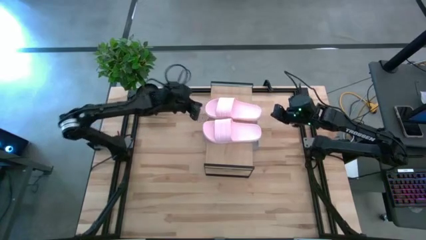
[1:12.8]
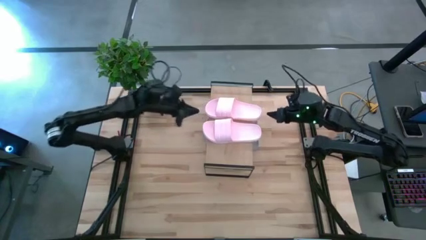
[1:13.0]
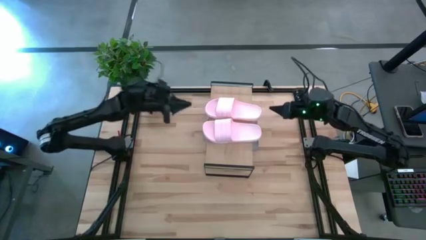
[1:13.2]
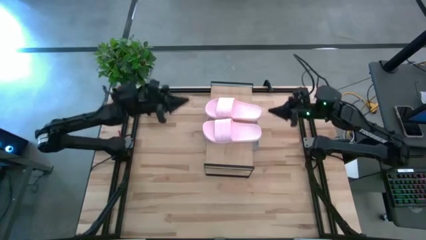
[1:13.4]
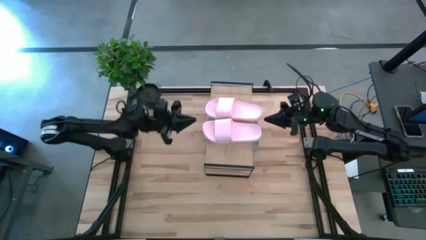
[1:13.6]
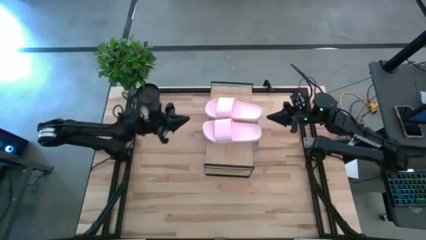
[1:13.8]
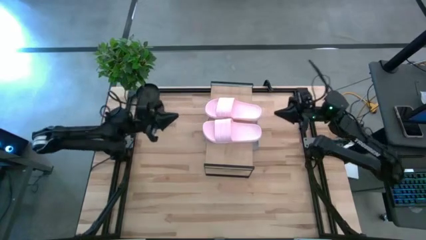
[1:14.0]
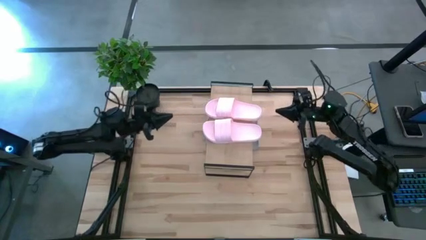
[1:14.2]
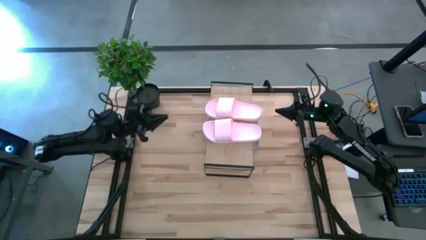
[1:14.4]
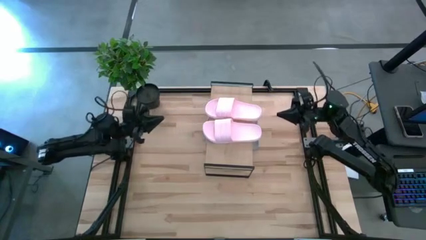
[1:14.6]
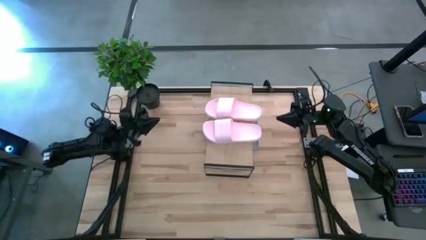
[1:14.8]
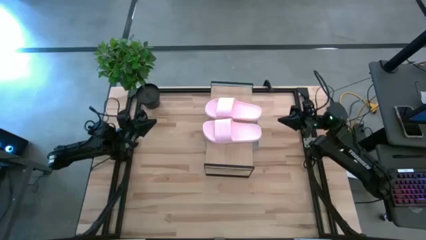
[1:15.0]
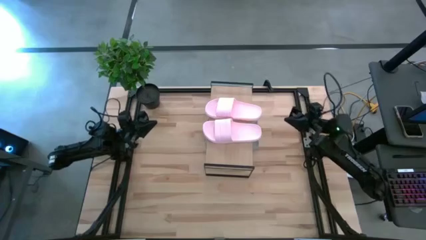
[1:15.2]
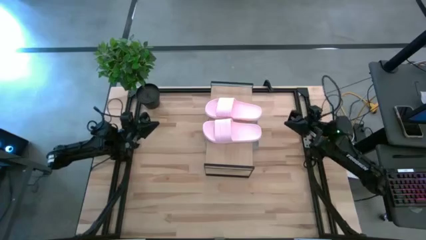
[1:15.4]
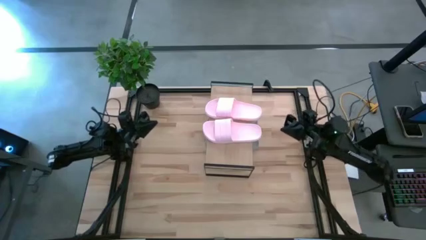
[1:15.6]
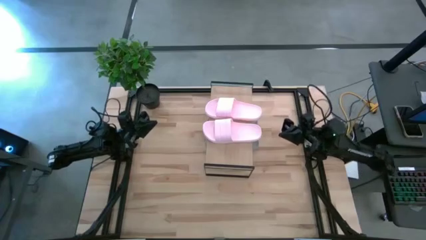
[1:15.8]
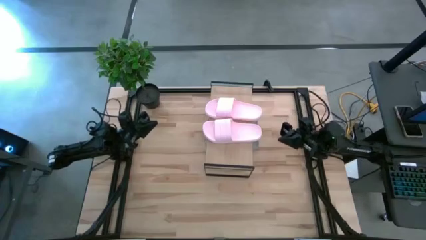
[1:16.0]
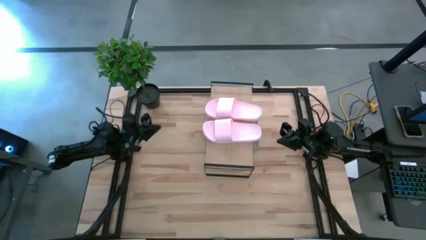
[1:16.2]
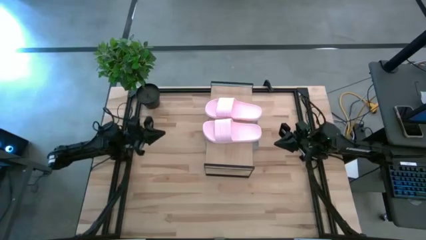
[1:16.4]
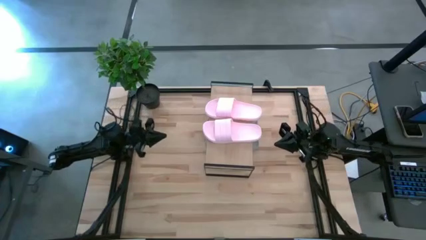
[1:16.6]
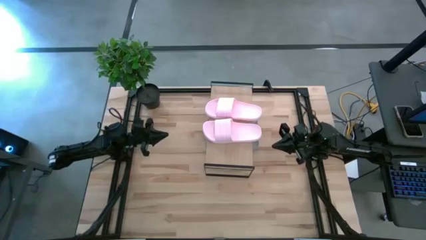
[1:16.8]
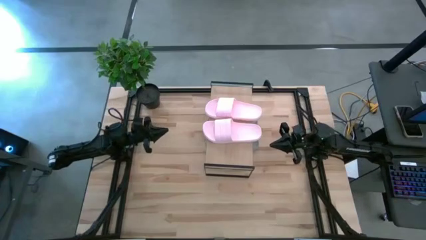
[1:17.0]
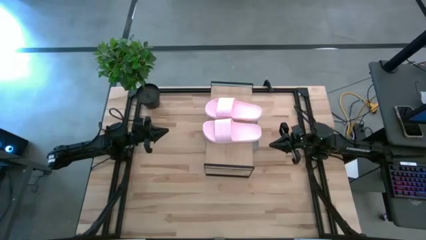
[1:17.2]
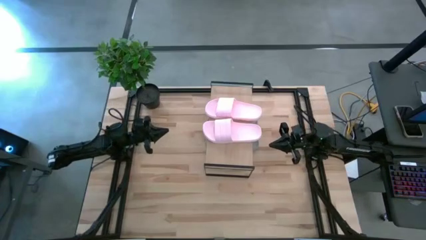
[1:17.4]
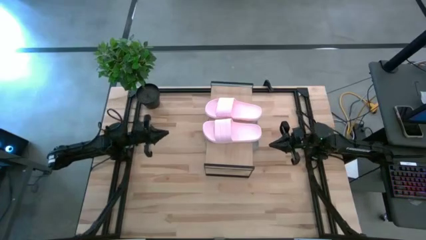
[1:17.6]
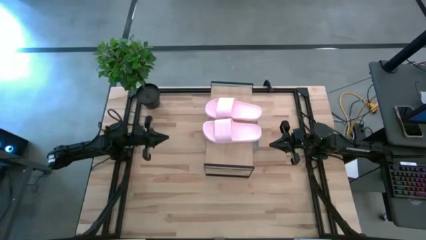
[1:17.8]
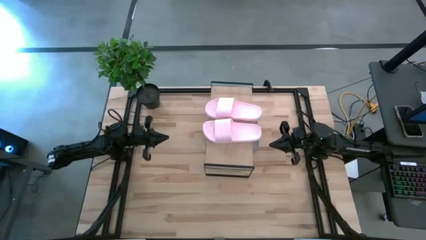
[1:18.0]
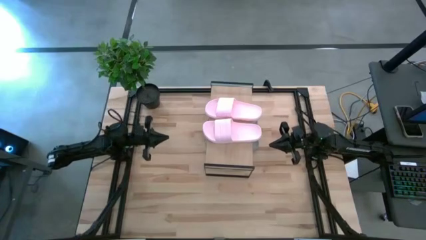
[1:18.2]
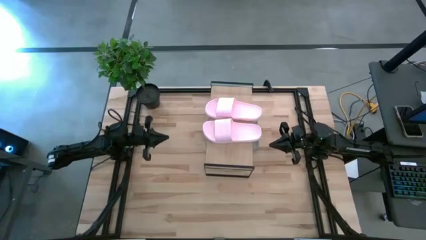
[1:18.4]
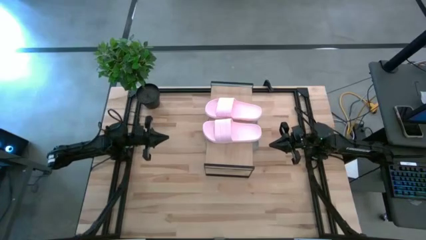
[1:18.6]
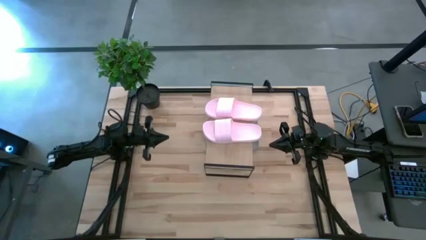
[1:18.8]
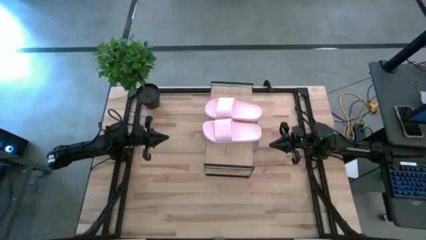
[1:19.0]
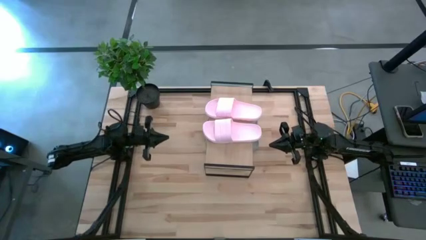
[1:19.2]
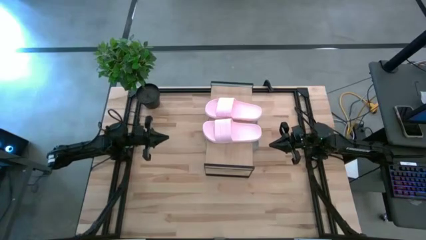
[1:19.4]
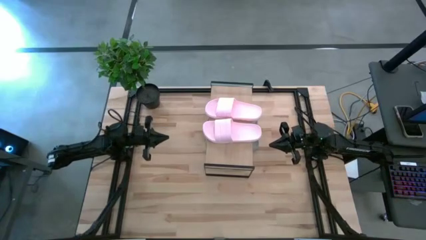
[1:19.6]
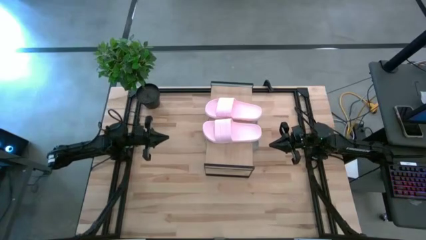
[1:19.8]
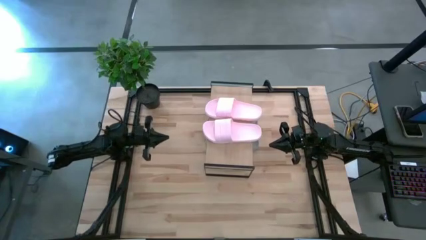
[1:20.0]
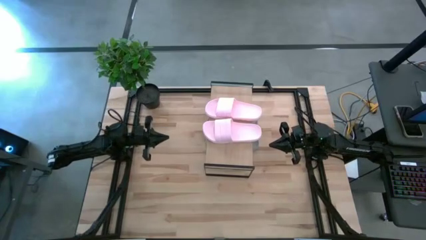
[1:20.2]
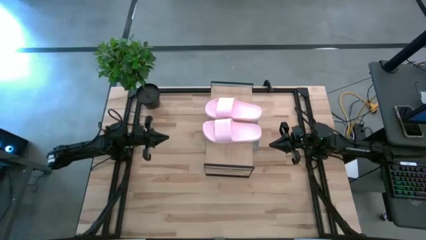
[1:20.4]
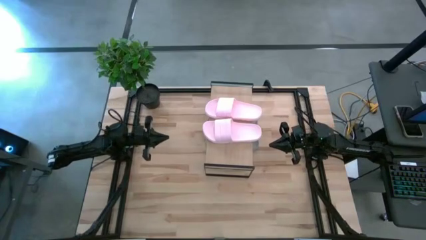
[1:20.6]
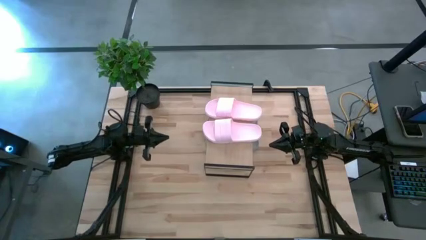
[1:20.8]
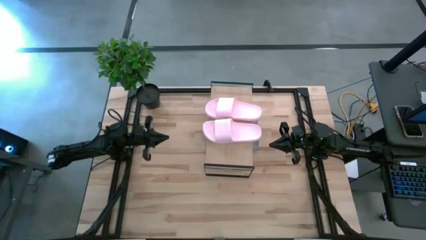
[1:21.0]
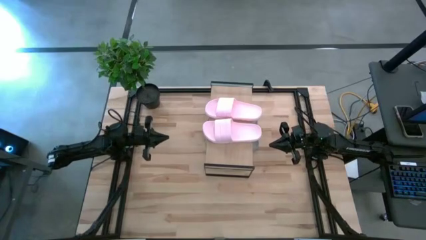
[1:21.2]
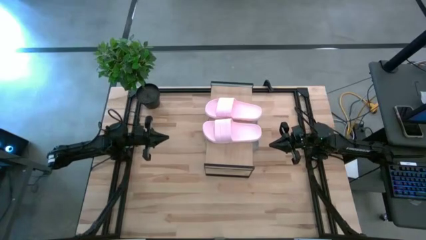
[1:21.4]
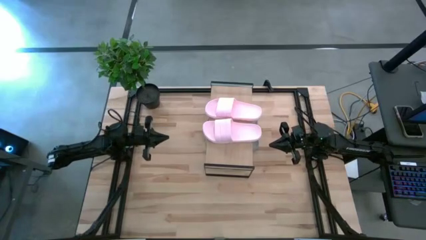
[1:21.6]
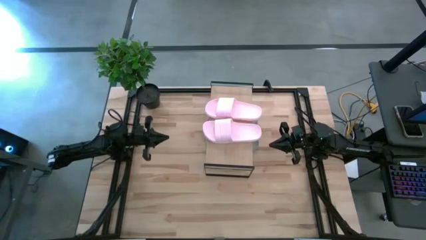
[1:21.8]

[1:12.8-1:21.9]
Task: Pick and place slides into the shelf
Return to Home Position

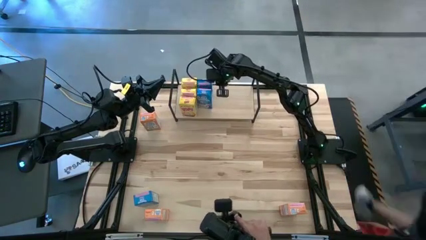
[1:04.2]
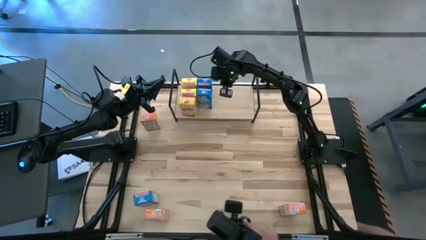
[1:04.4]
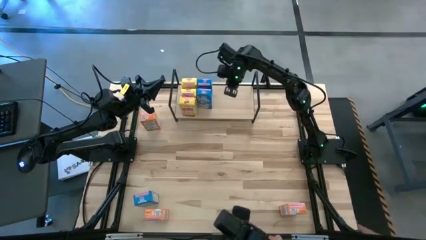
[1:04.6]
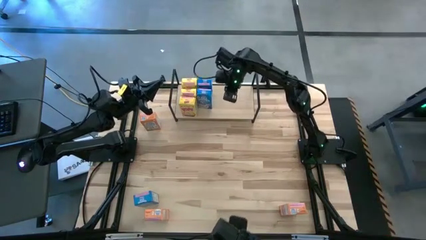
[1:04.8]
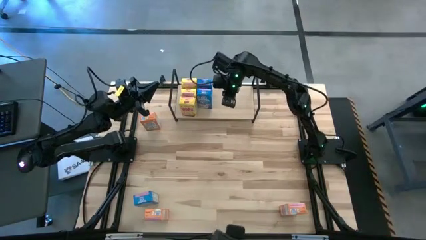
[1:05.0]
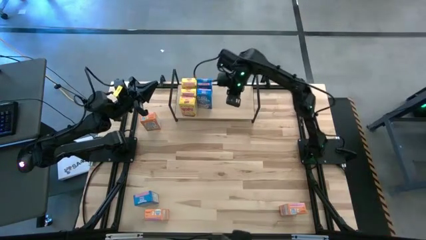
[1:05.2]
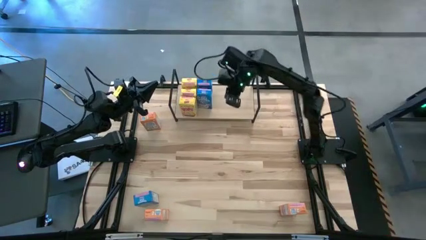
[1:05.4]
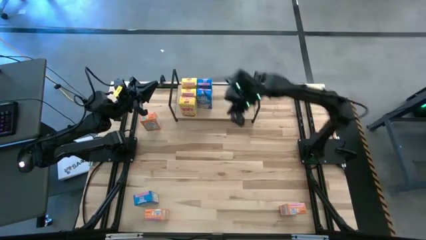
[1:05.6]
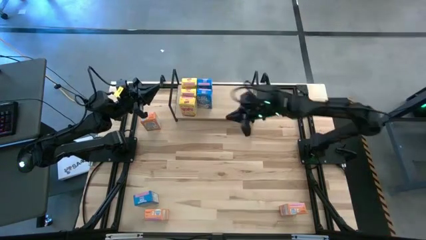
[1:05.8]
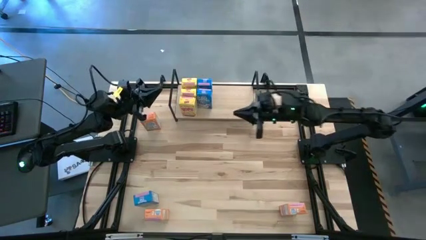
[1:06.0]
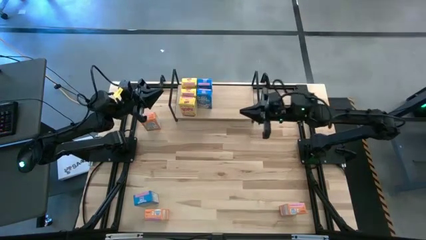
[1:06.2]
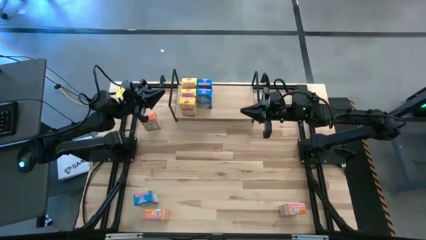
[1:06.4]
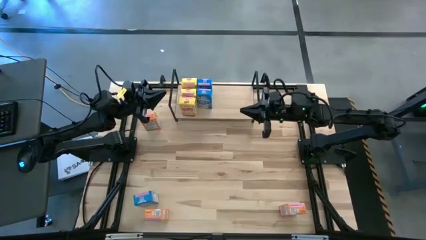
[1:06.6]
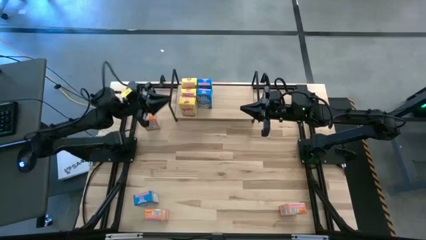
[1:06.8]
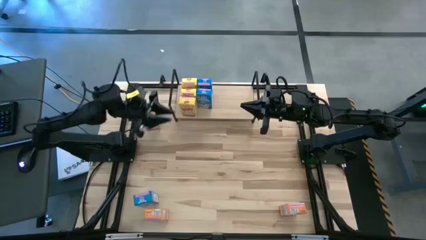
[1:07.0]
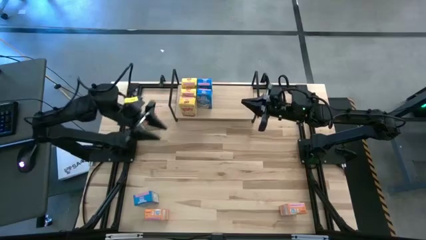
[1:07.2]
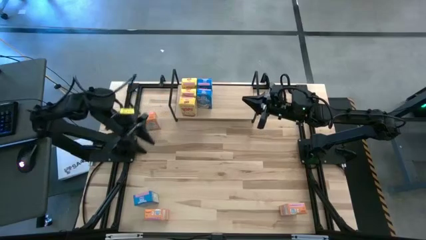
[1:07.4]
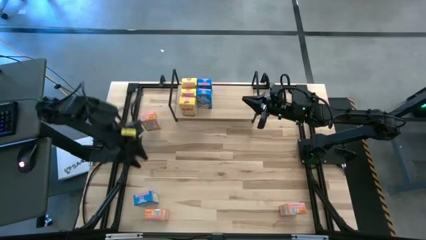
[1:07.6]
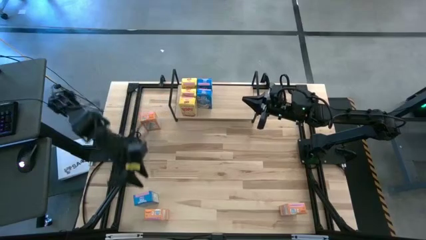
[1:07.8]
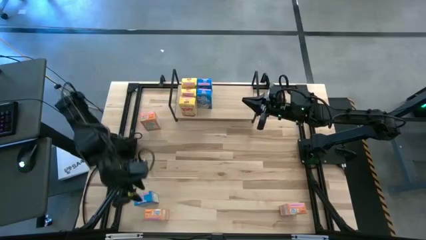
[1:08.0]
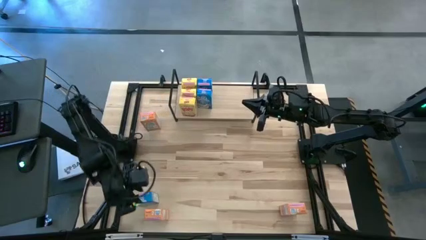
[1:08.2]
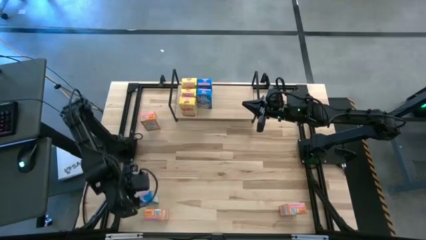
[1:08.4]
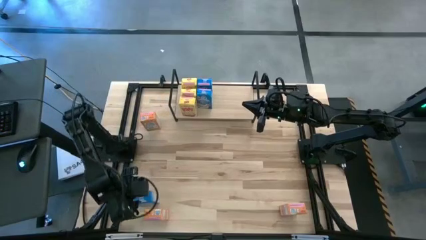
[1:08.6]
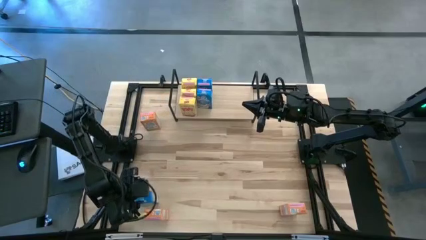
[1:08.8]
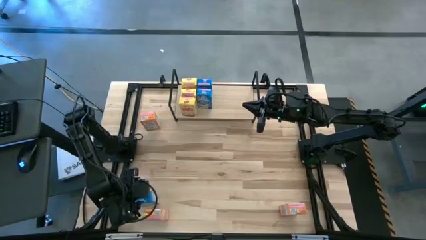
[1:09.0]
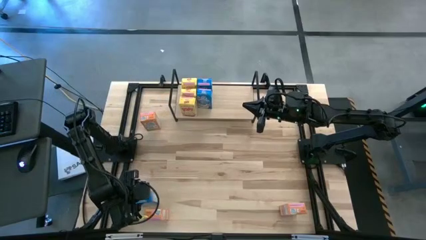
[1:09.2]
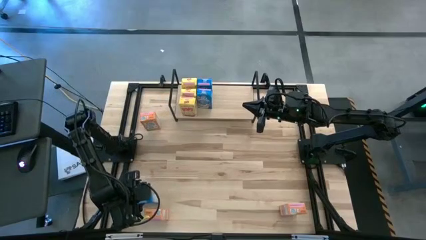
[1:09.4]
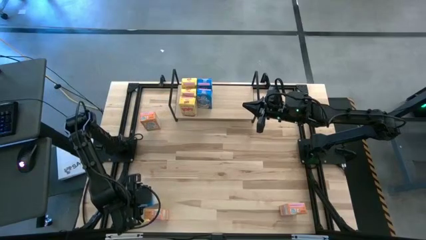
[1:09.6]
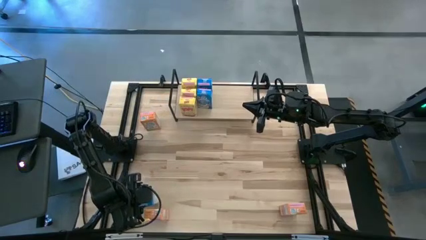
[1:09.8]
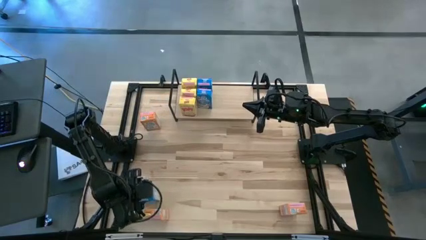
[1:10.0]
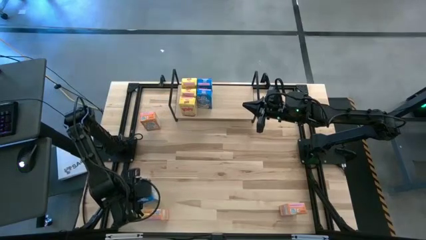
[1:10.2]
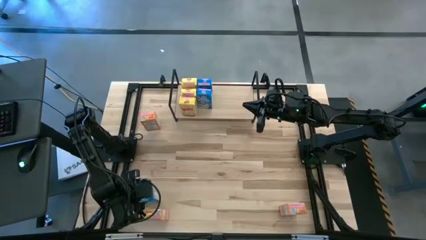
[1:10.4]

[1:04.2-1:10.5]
Task: Stack cereal on shelf
Put the blue cereal box on the shelf aligned with the other blue cereal boxes
